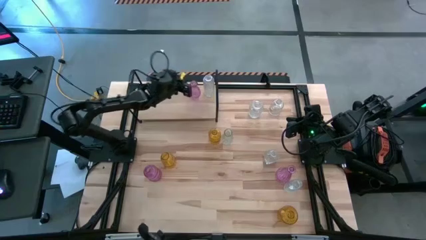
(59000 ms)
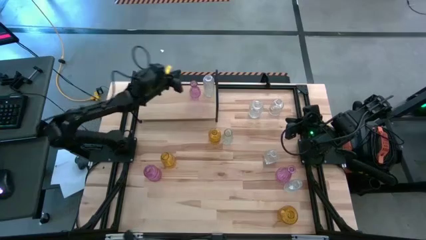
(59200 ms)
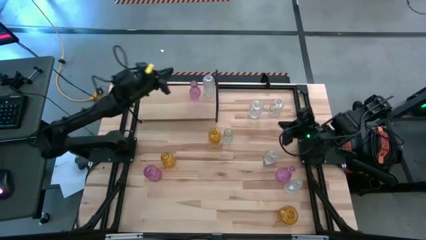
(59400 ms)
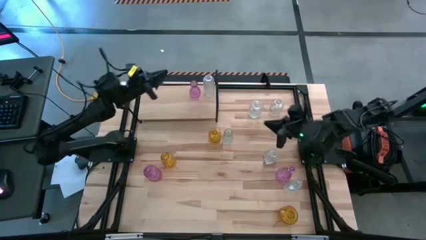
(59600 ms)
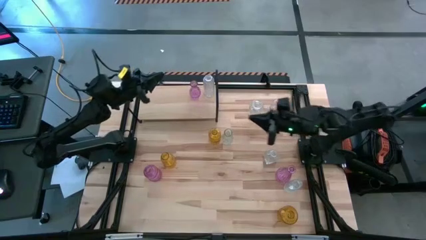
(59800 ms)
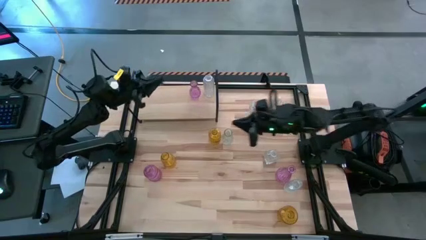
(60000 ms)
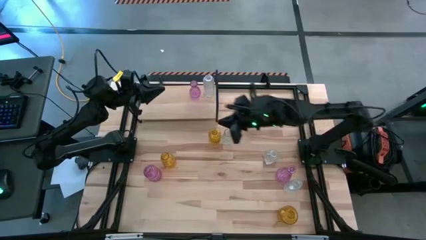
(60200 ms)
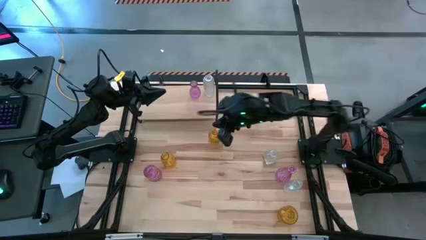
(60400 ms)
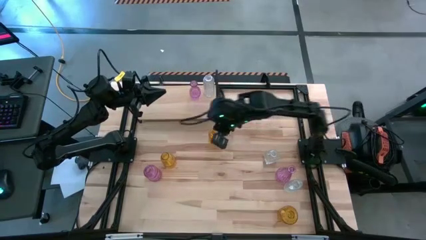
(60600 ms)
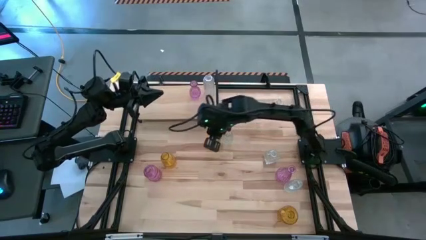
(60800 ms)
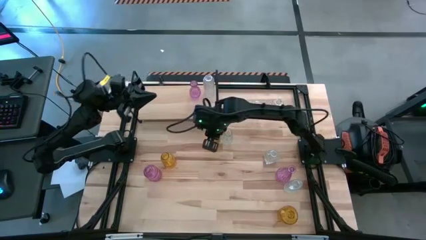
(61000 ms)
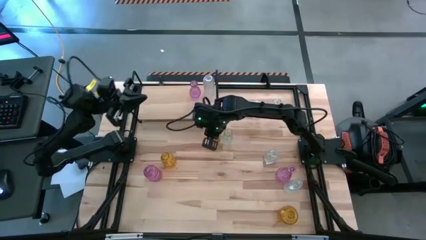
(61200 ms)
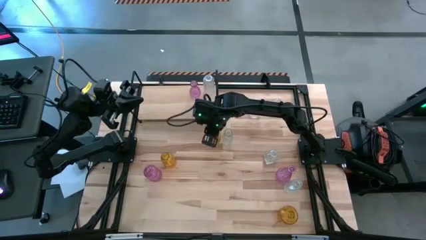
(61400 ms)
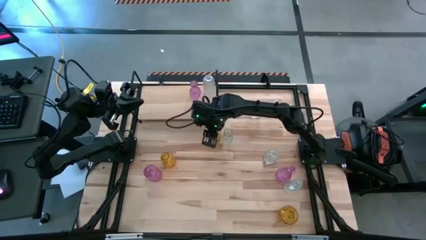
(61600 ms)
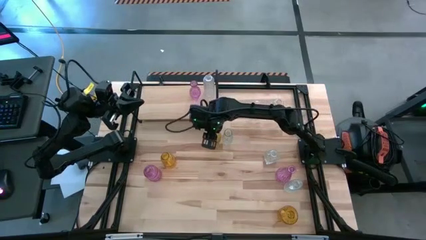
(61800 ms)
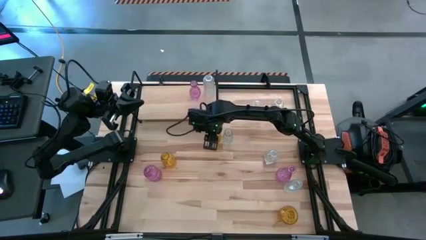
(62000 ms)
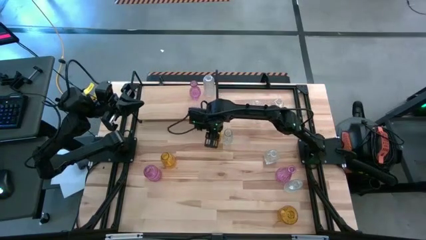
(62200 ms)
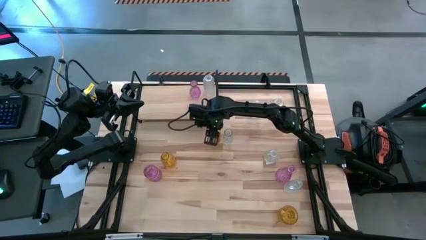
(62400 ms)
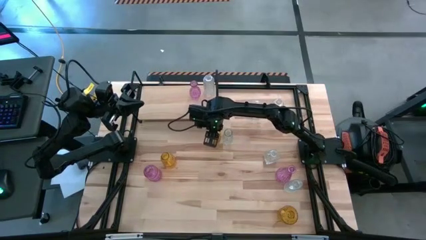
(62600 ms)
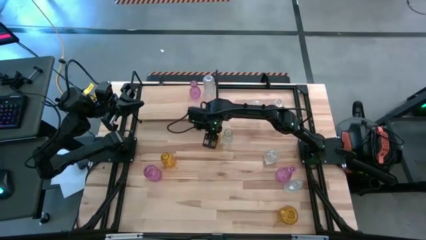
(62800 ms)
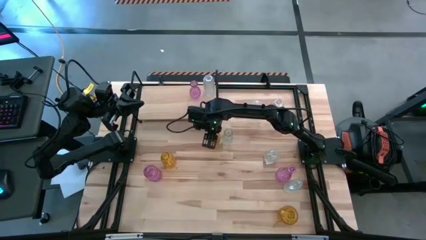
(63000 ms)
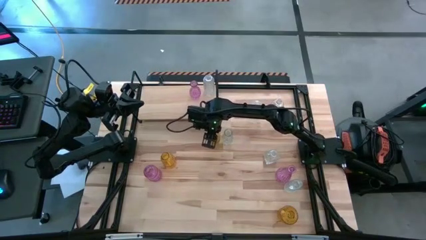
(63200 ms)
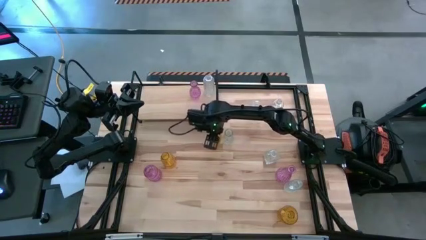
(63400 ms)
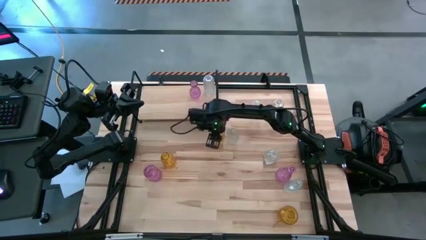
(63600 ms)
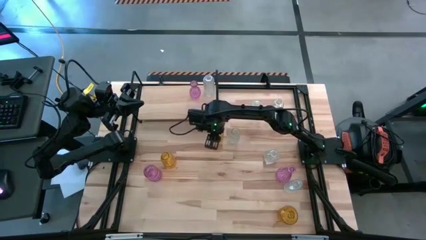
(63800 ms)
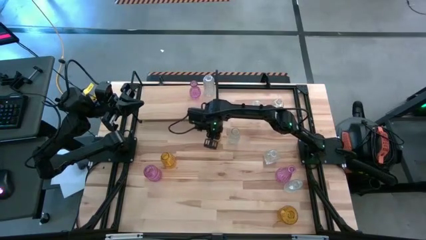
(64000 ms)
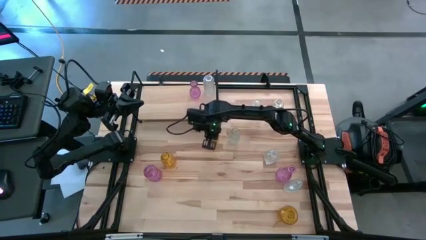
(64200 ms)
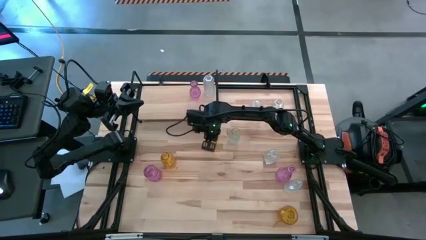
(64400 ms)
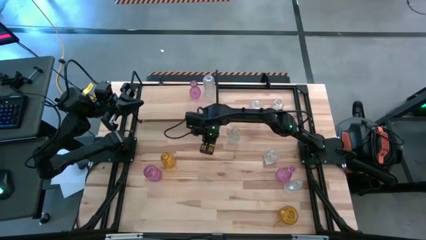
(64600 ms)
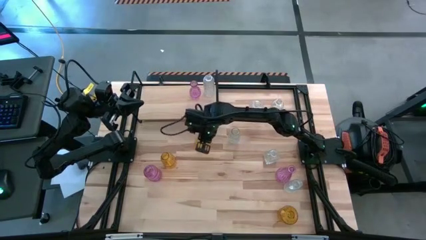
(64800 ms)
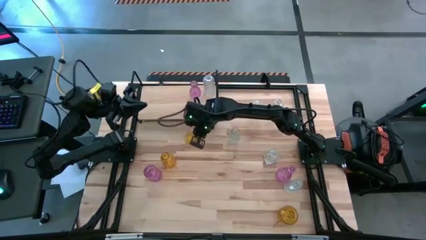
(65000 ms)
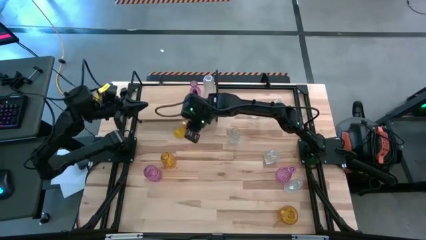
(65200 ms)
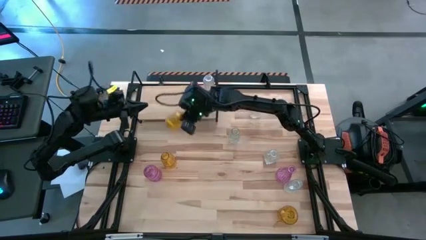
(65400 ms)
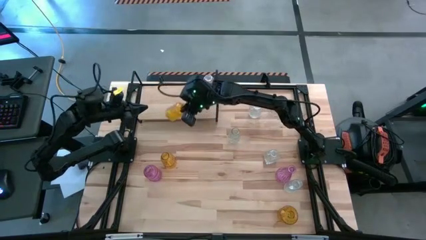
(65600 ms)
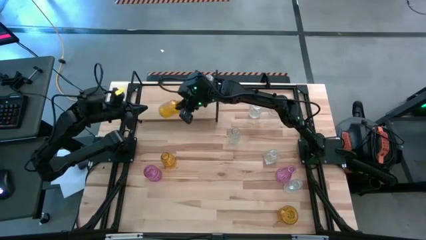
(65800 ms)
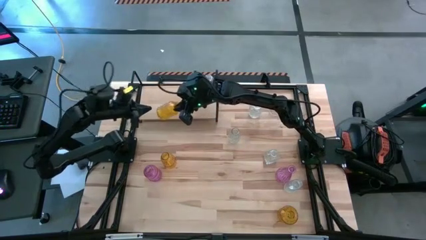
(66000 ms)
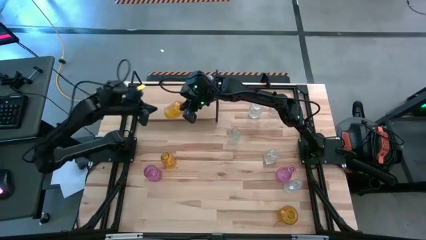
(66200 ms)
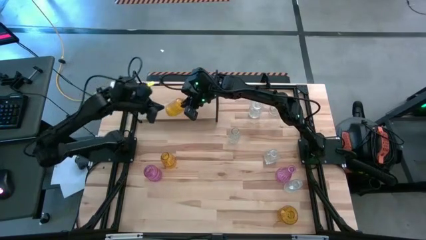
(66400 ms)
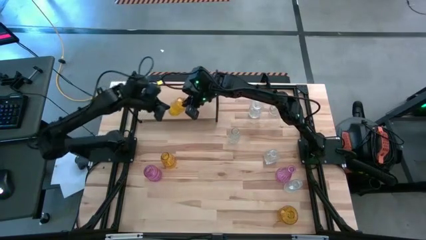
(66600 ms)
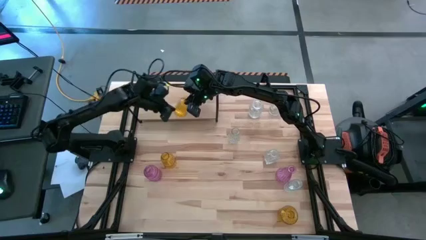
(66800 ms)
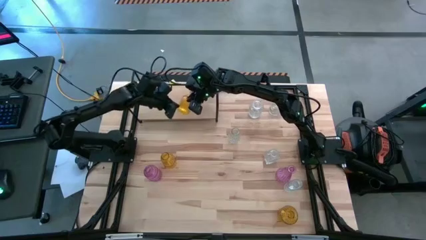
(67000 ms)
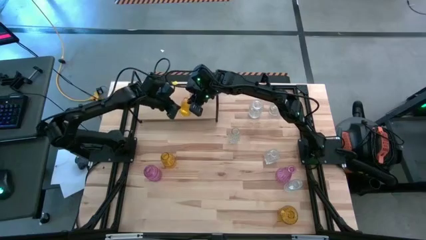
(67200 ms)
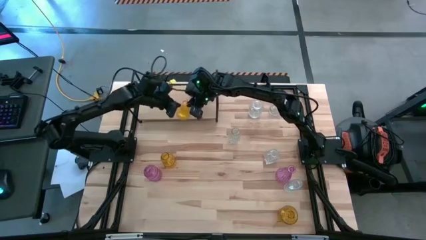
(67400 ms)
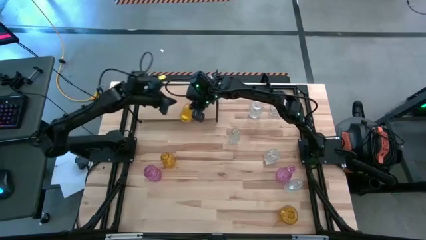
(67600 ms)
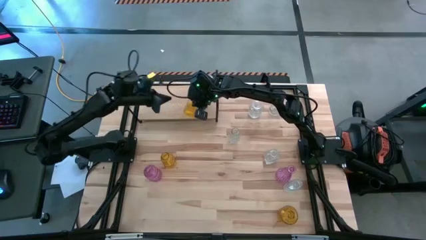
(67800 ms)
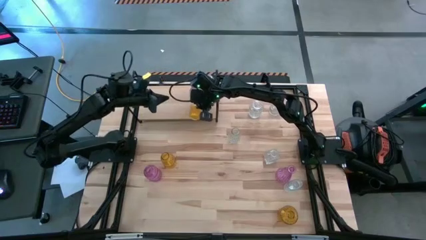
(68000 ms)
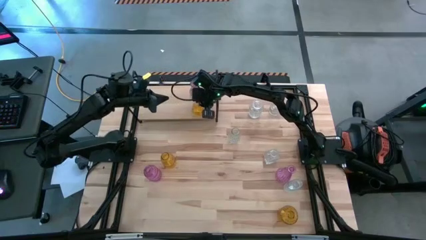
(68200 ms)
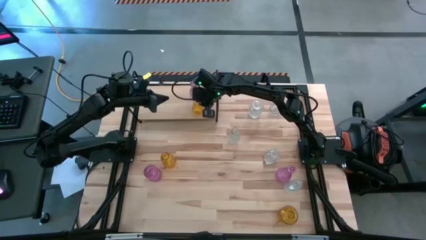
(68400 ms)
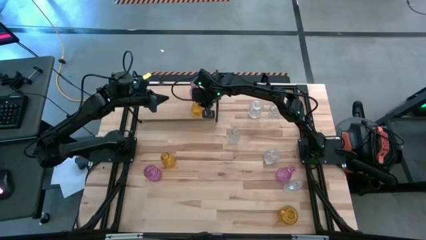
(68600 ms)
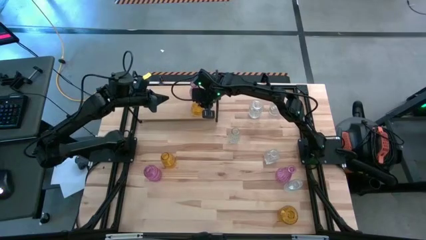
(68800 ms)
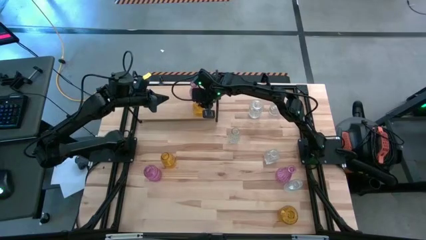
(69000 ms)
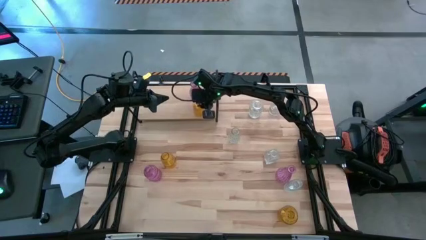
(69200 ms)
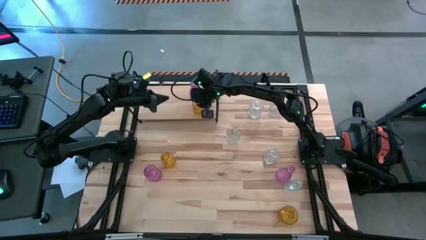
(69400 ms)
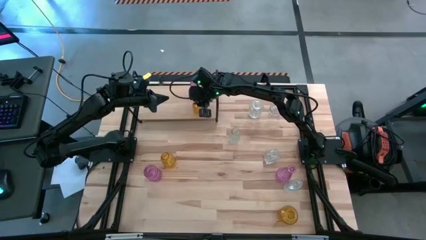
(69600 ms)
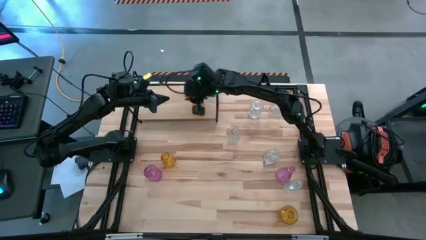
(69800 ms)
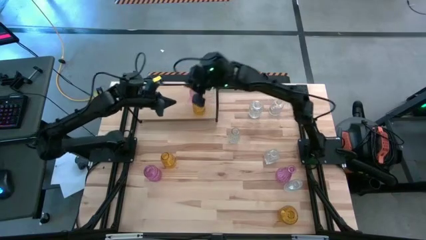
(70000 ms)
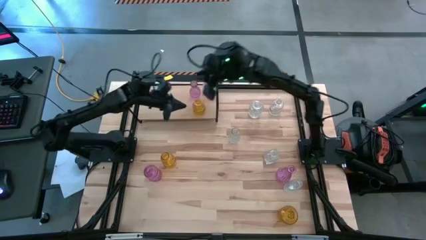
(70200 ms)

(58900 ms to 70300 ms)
Task: sort vases onto shelf
Put the yellow vase in the top left corner of the shelf

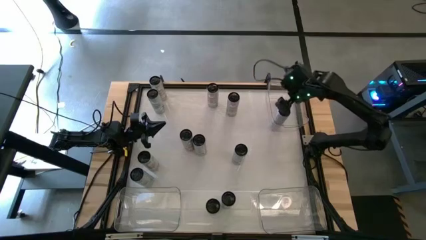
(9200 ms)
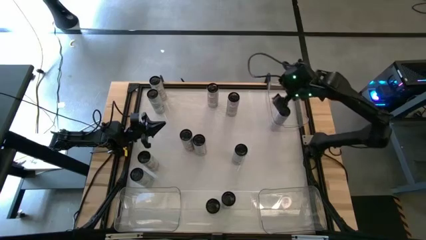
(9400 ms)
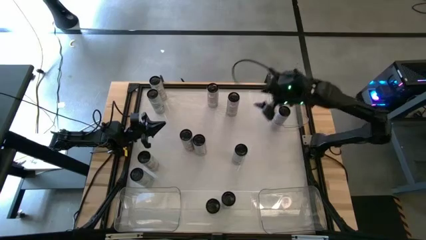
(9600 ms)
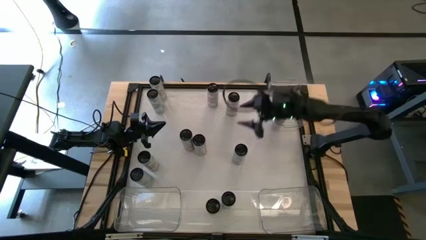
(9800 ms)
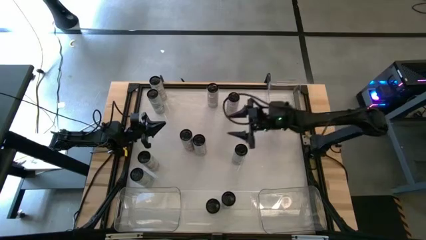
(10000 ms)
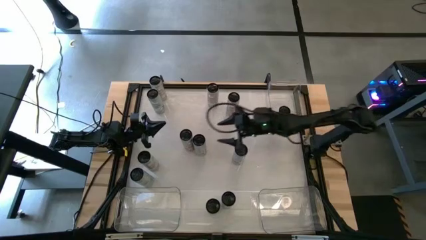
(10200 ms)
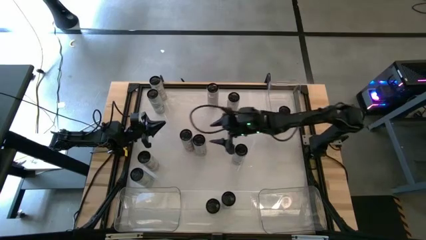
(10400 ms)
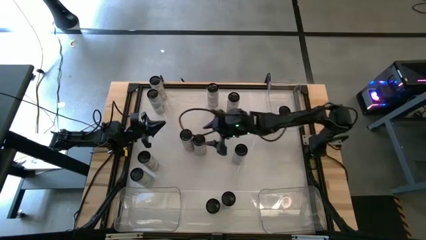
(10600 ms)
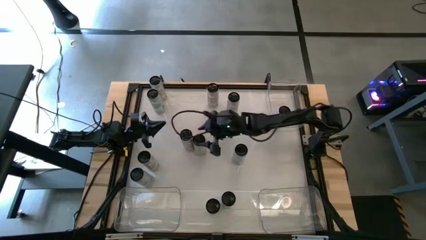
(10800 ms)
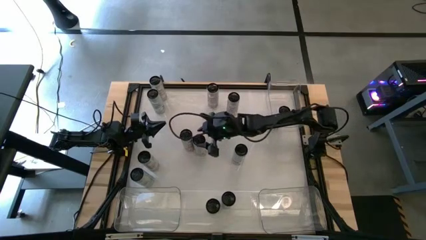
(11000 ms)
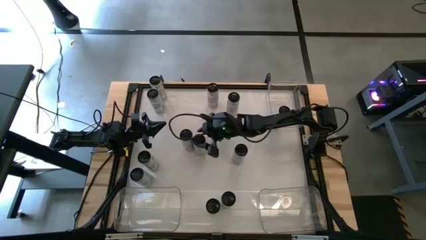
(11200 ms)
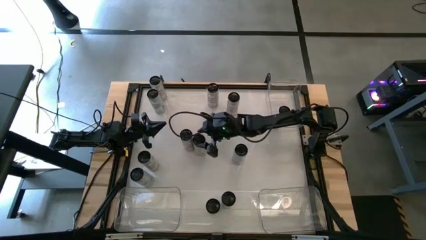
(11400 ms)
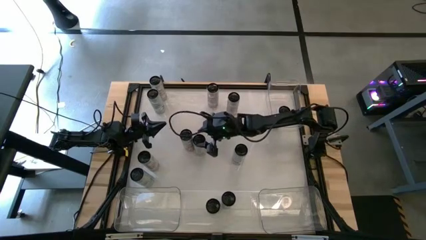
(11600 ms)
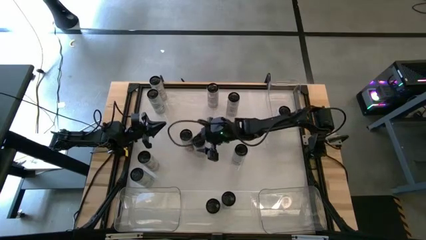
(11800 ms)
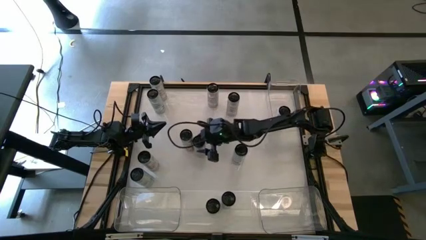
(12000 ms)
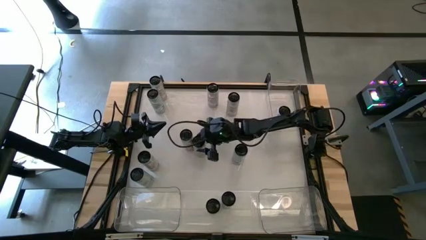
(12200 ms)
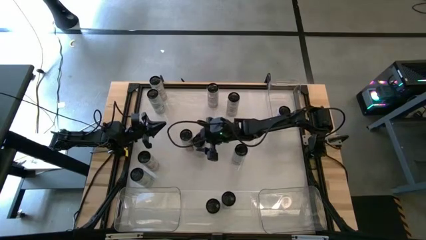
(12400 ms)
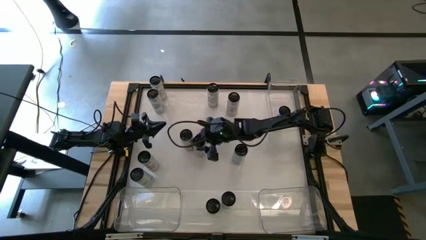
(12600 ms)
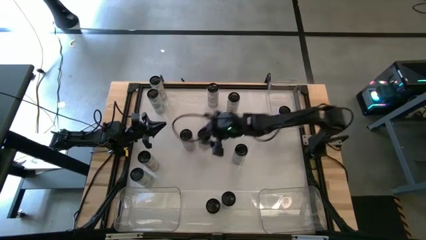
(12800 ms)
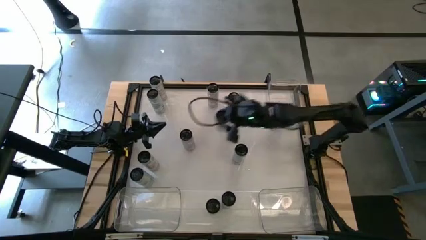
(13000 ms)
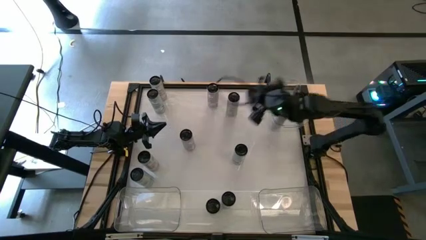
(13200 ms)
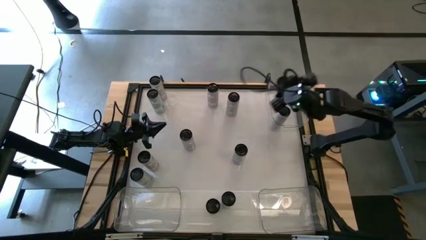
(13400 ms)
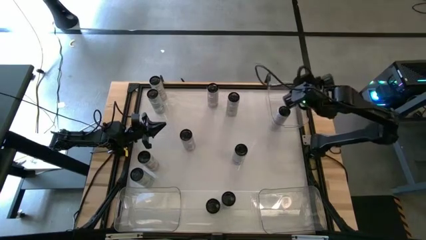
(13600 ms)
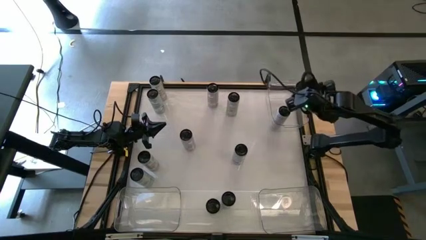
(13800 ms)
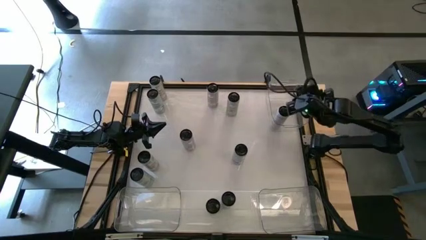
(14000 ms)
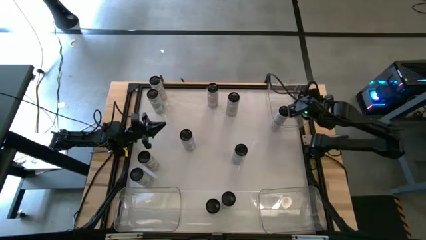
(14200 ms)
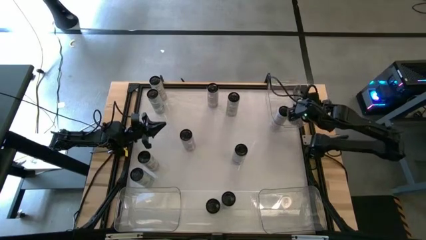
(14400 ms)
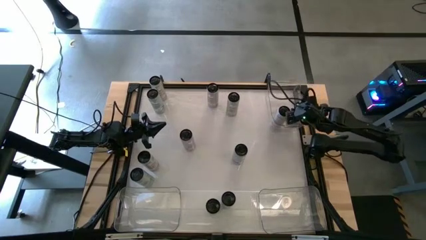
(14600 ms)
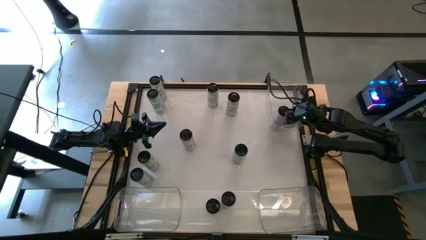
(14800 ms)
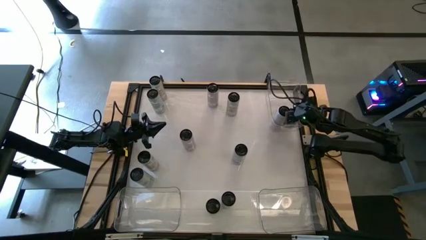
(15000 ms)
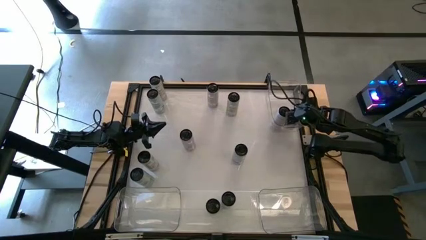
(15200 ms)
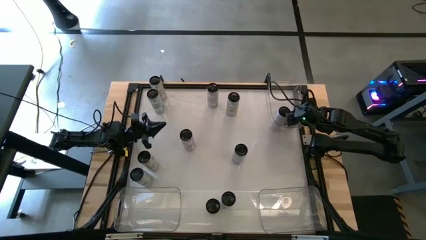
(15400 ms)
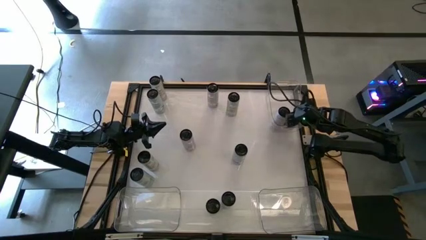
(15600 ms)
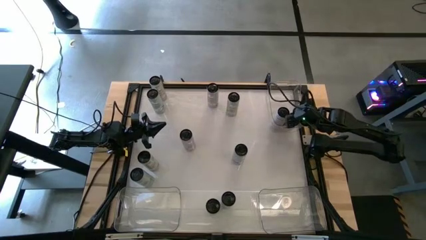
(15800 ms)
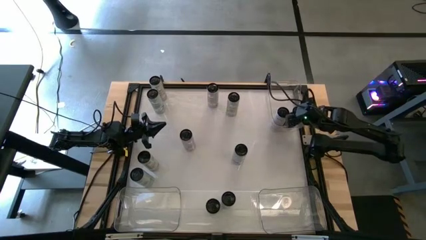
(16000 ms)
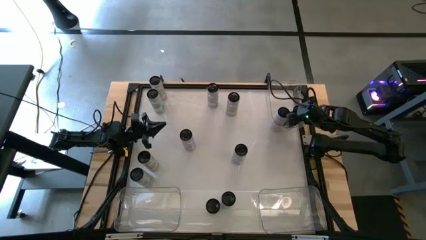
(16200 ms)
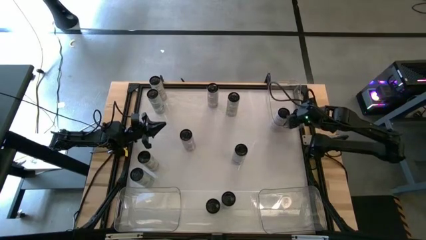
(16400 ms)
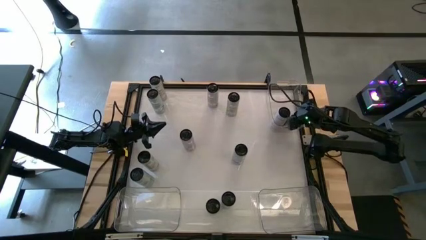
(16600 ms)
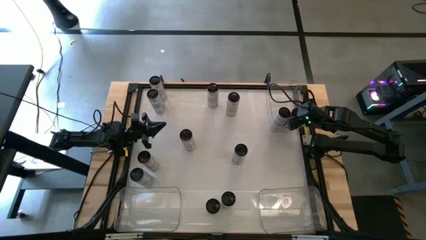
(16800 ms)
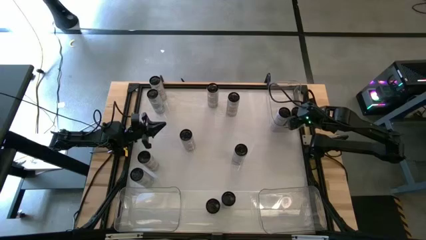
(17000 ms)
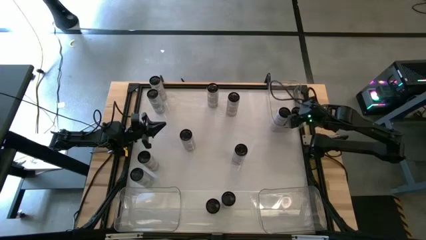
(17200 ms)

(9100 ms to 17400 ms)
Task: Sort soda cans
Put the right white-pink soda can into the top transparent bin
